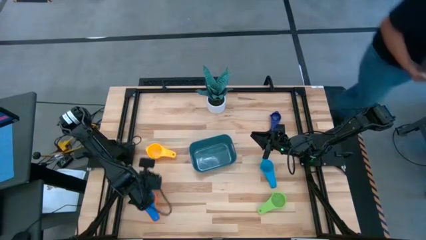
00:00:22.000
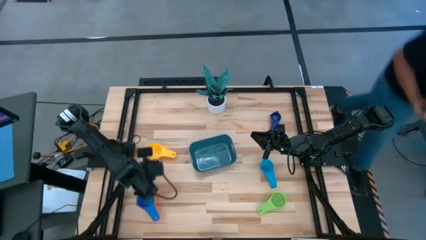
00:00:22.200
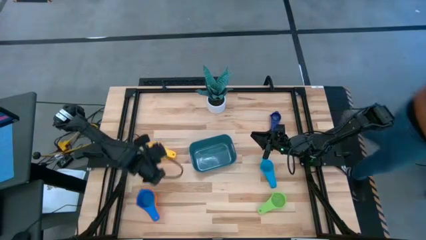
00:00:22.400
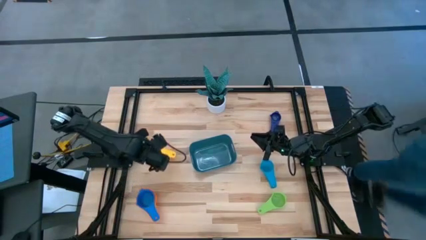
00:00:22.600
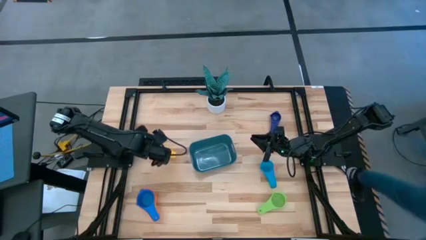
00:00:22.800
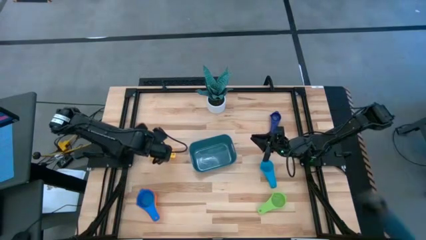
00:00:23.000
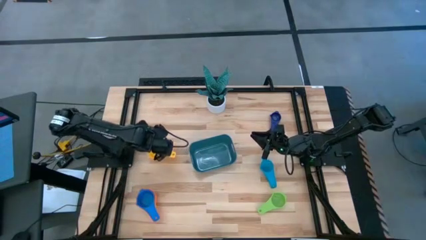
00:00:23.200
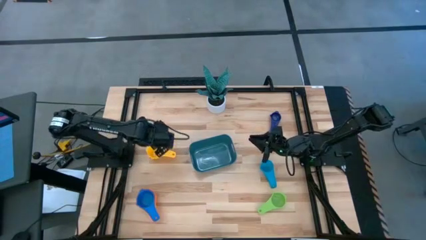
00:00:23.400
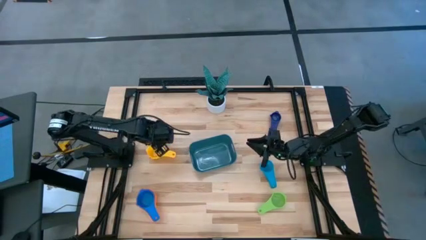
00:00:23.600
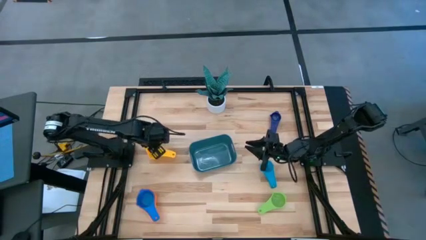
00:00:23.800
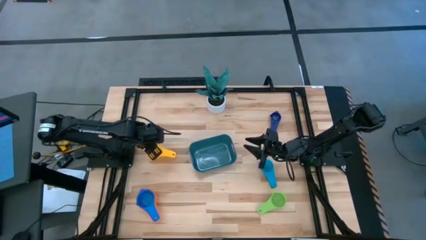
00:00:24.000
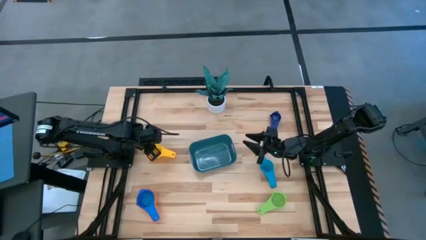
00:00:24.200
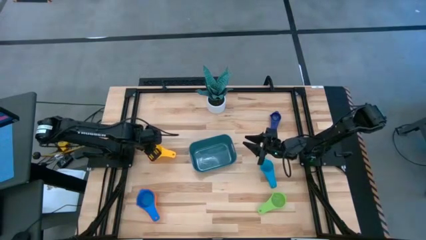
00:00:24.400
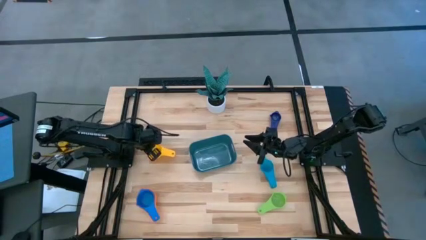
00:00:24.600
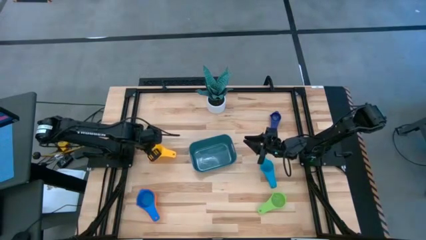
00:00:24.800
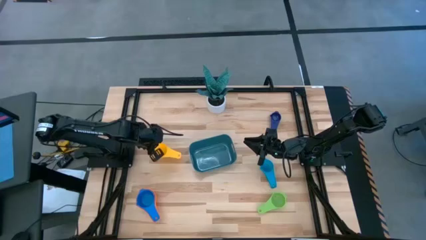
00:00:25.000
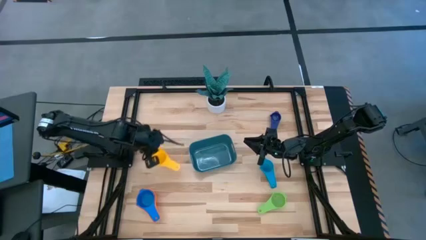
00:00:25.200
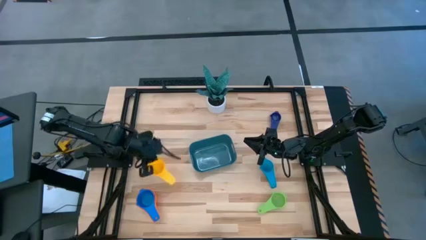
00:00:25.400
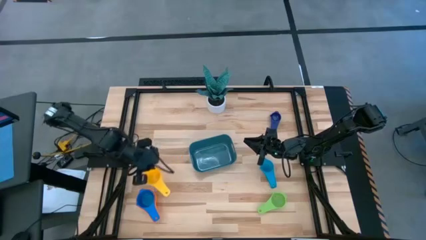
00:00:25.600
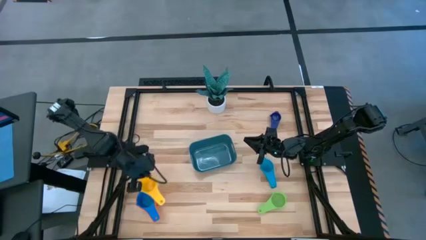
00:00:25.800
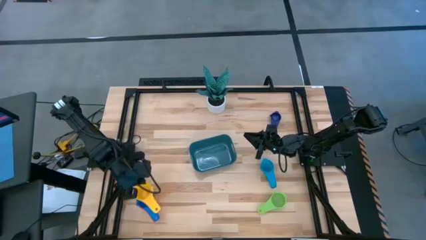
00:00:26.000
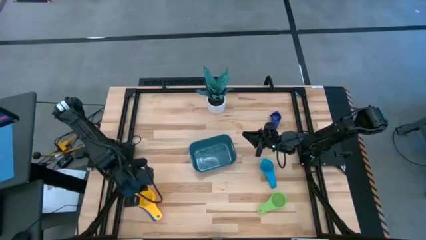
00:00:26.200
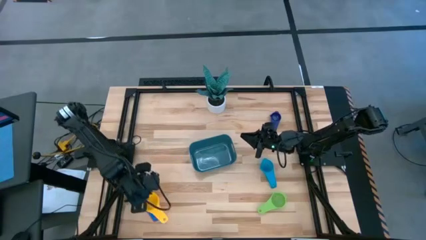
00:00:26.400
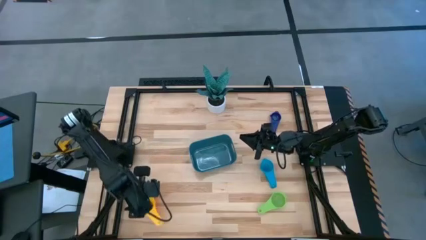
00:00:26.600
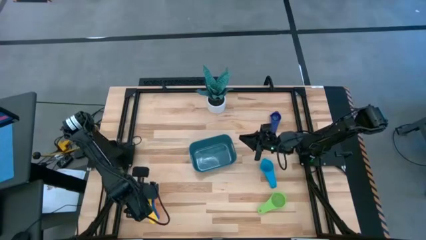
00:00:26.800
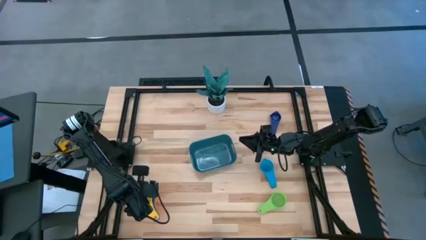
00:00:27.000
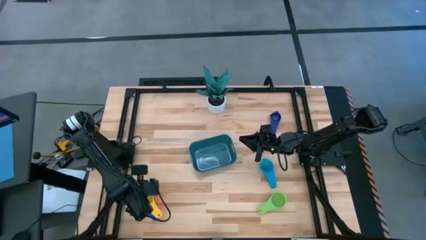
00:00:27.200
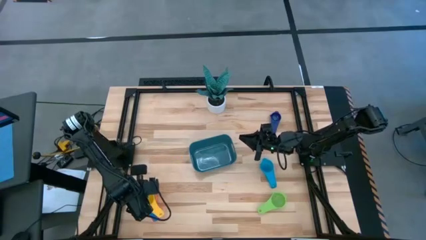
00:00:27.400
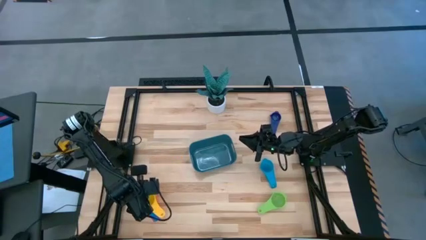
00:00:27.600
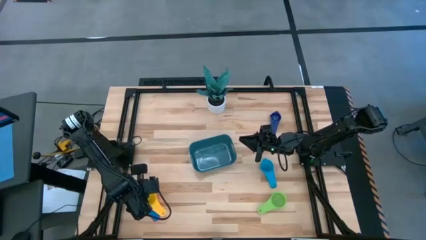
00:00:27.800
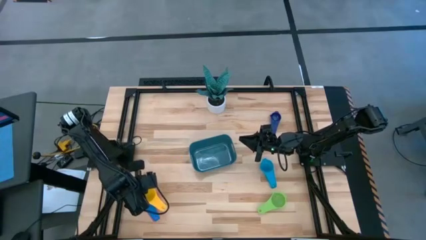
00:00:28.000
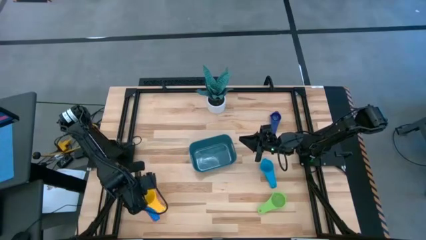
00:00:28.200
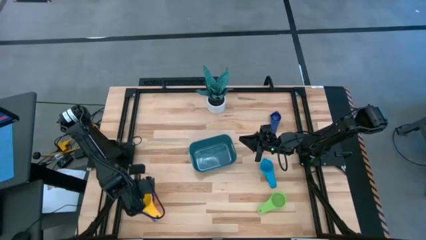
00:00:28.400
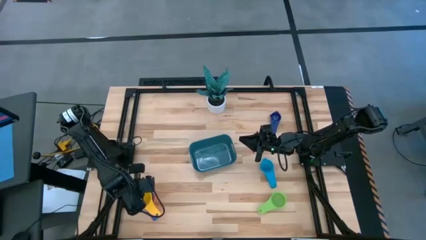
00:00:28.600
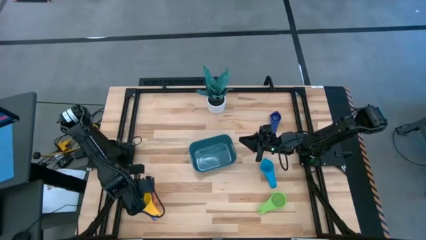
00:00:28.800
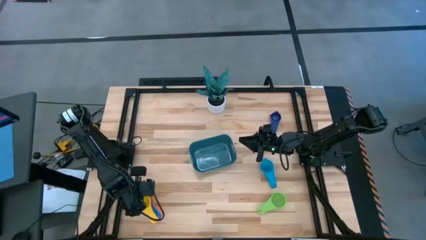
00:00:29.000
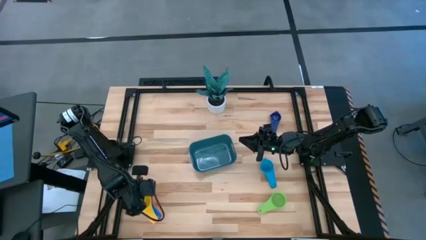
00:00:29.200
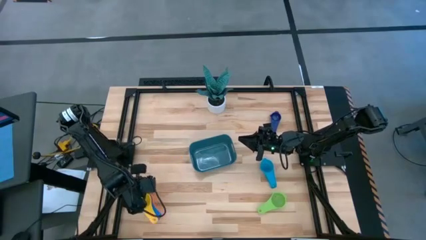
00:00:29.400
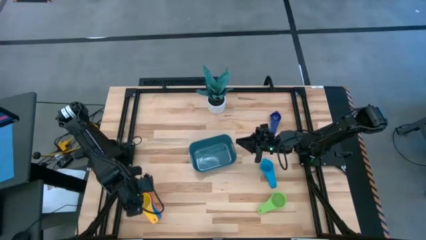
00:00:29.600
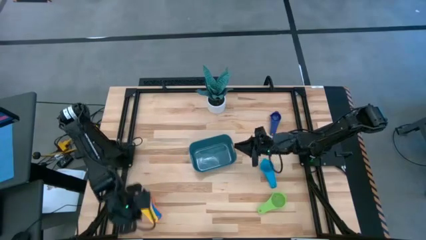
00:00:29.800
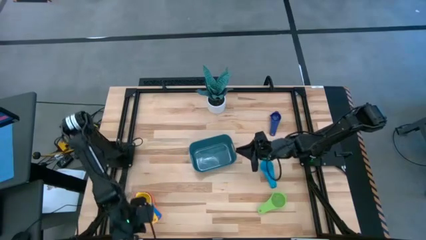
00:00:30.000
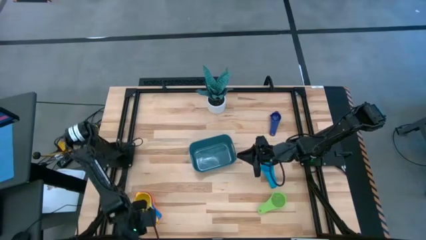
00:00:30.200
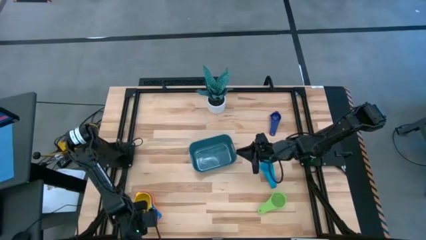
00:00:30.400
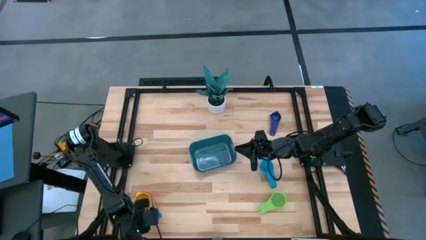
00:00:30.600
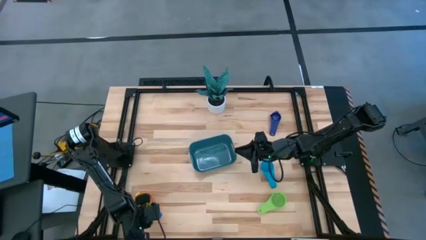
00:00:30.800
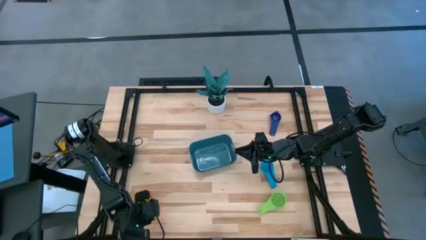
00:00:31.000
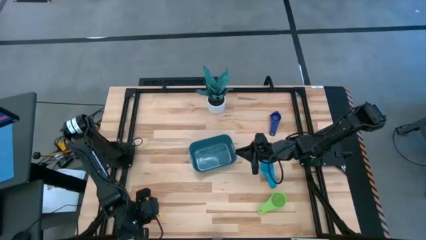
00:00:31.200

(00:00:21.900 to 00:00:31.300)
Task: Nest measuring cups in basket
Stack the yellow measuring cup on top of the blue measuring cup

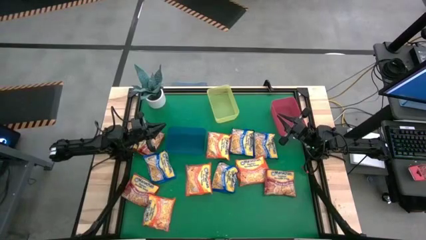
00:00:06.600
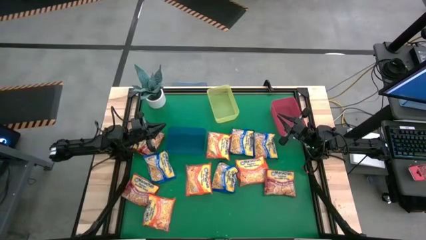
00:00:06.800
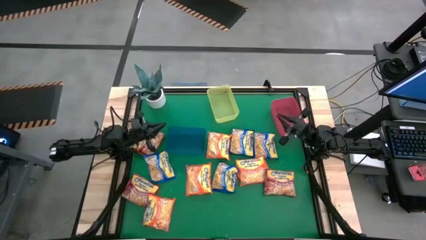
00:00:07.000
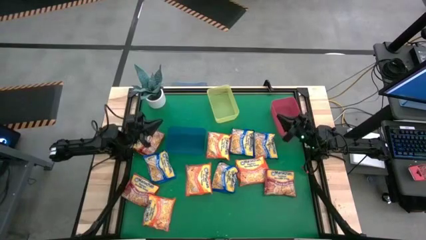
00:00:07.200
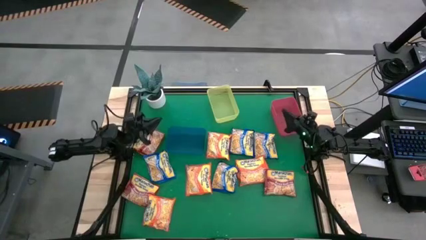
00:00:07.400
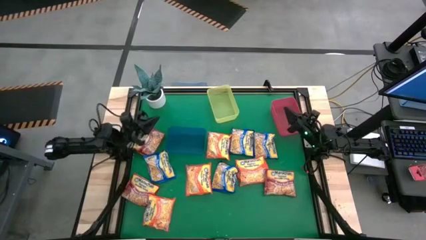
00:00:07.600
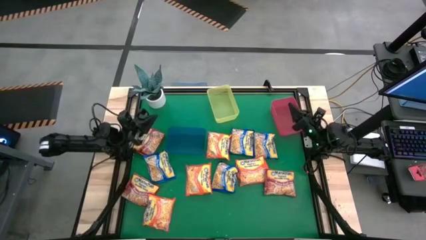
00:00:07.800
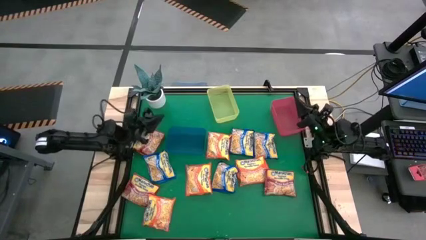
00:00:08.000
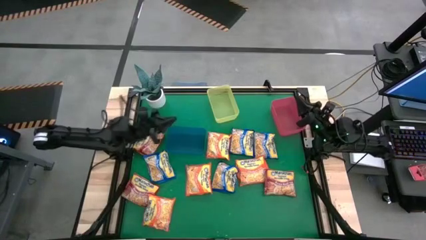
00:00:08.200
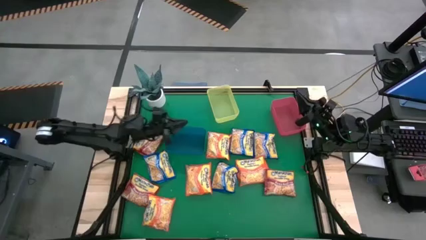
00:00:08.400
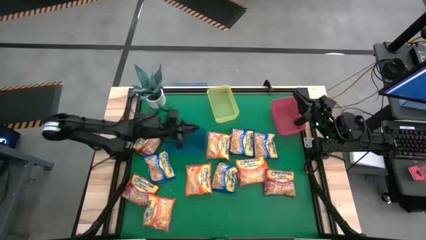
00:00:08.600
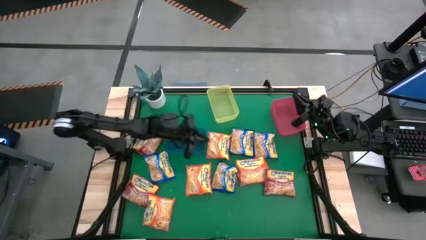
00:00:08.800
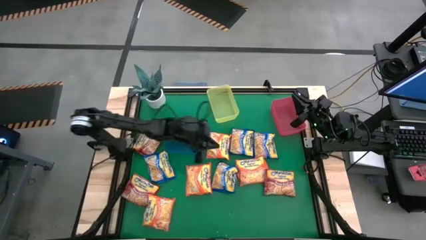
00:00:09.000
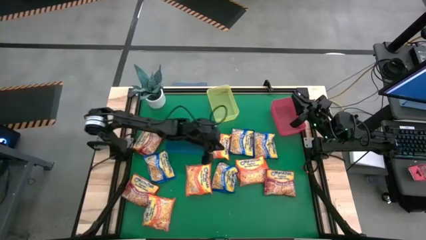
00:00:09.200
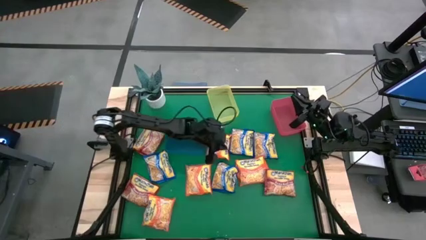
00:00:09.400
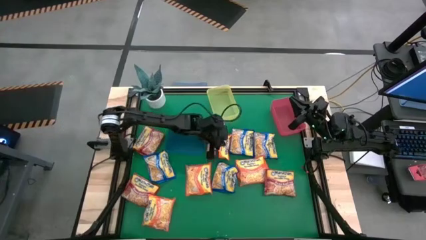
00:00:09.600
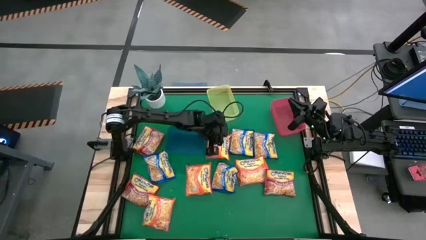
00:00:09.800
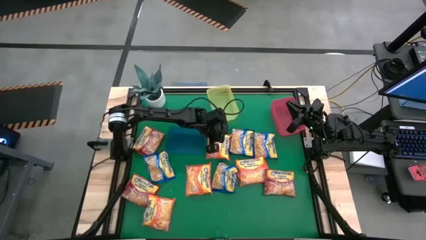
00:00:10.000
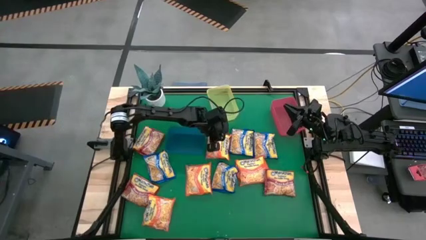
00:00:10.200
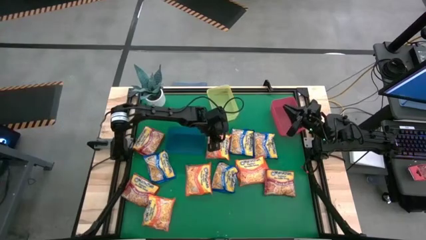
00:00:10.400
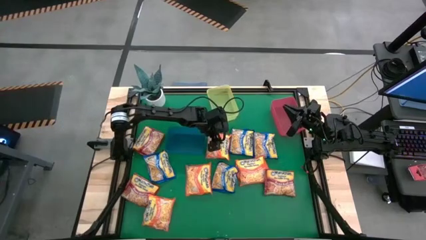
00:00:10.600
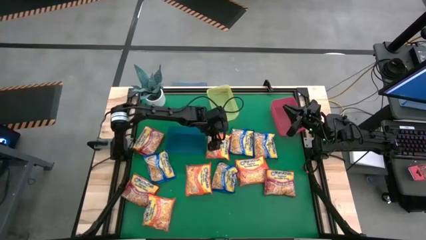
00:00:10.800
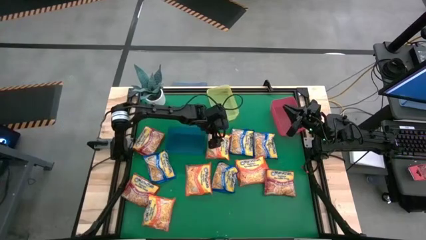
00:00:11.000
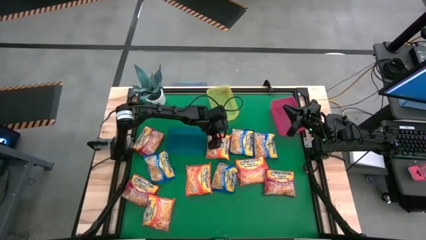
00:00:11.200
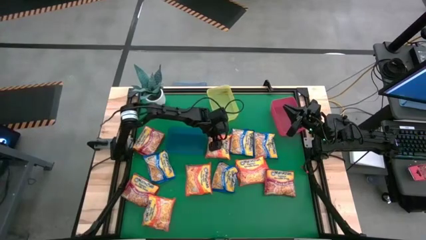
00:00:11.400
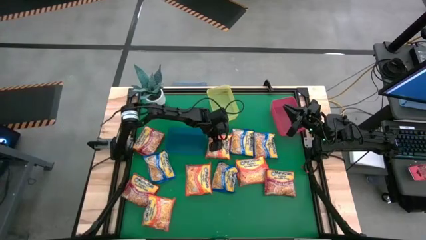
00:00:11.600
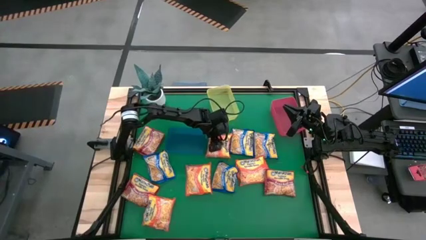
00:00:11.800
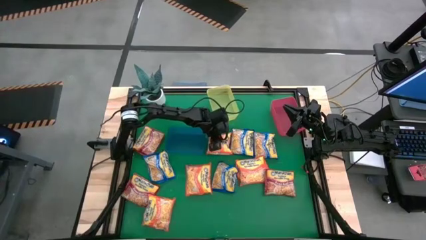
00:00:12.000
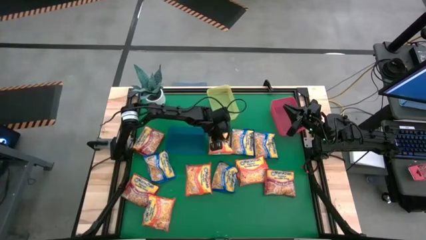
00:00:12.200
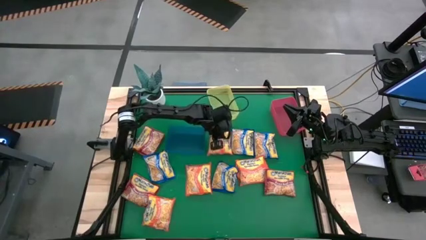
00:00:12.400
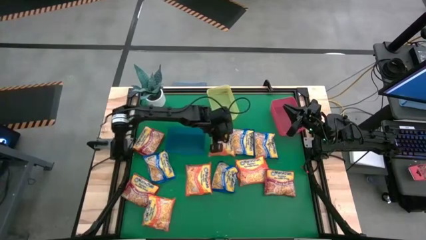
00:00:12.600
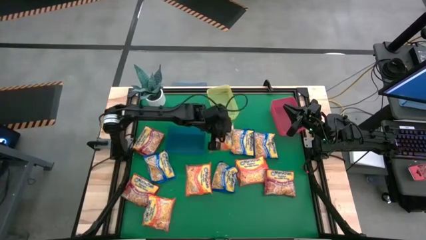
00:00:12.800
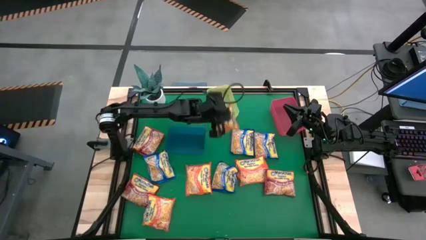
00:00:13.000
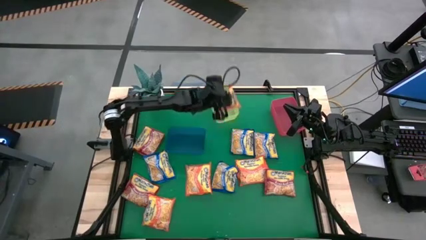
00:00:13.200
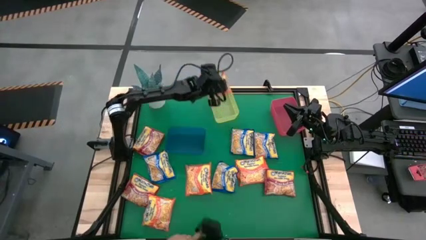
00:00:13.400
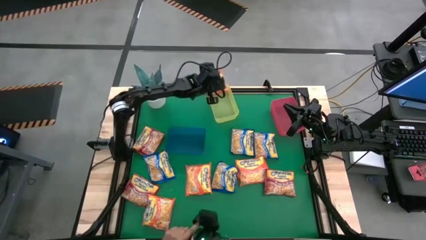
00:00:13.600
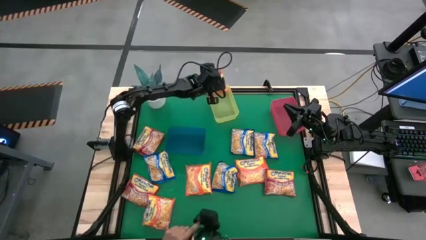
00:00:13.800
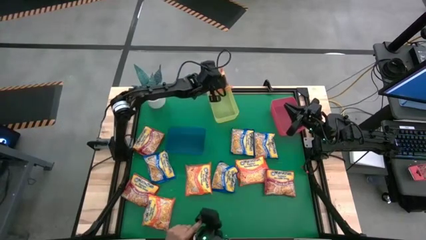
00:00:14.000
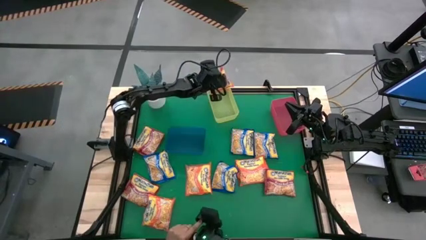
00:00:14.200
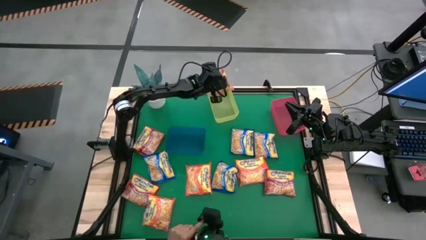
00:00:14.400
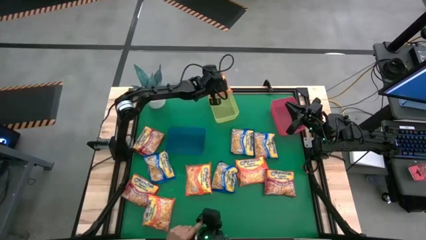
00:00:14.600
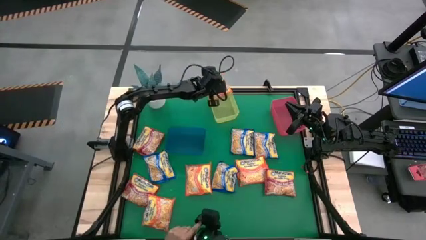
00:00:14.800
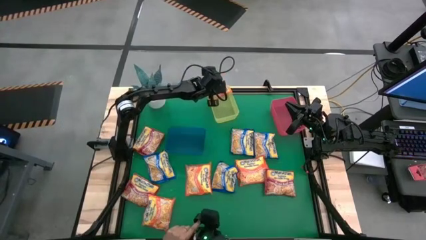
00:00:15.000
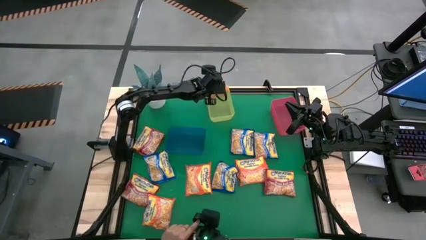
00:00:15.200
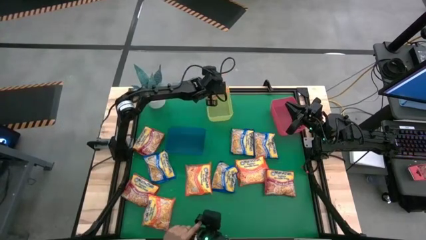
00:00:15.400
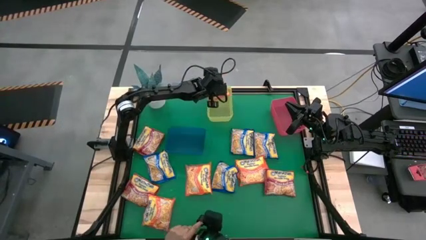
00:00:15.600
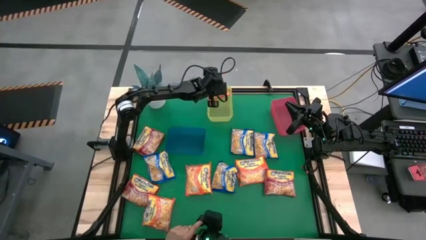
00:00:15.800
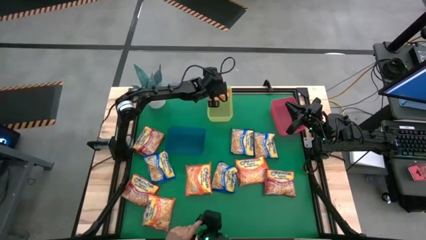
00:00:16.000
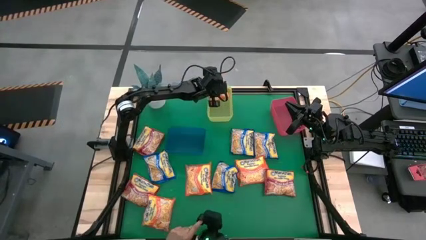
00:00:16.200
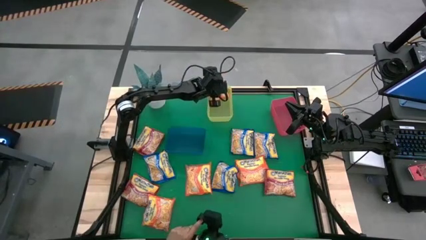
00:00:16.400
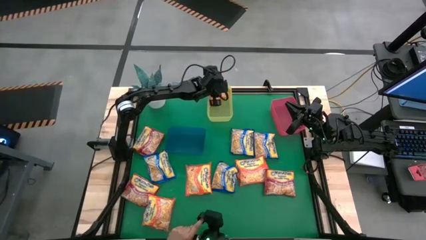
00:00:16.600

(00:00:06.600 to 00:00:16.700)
Task: Sort Maruchan noodles
Put the orange noodle pack into the yellow bin
